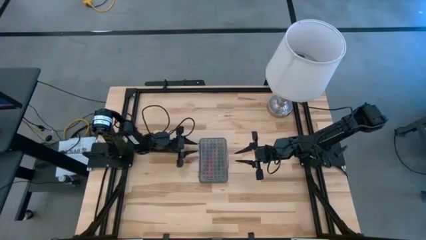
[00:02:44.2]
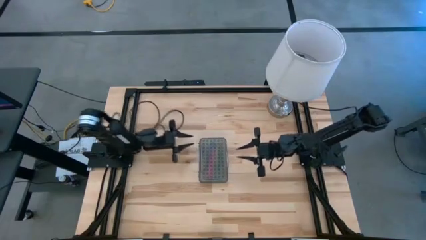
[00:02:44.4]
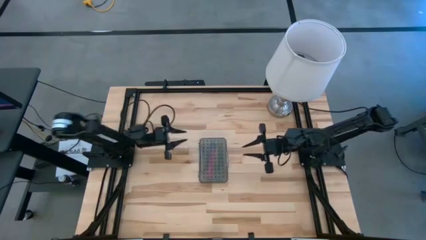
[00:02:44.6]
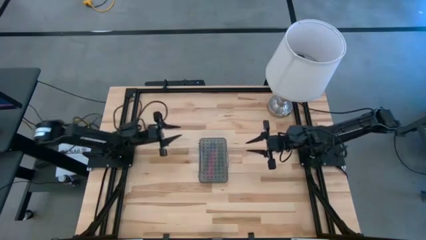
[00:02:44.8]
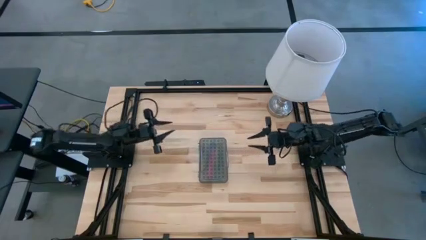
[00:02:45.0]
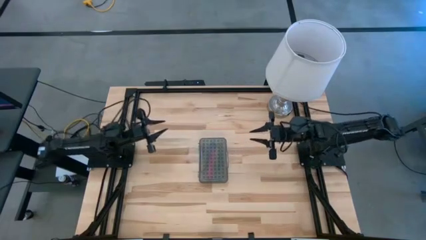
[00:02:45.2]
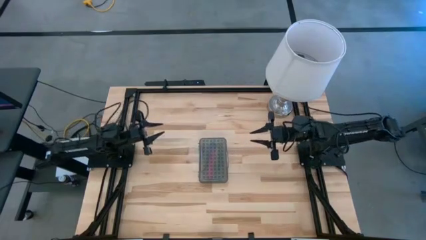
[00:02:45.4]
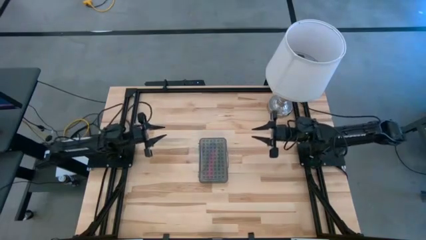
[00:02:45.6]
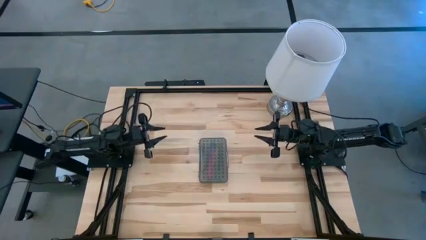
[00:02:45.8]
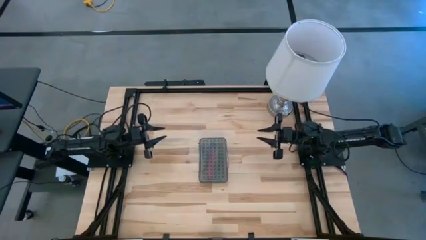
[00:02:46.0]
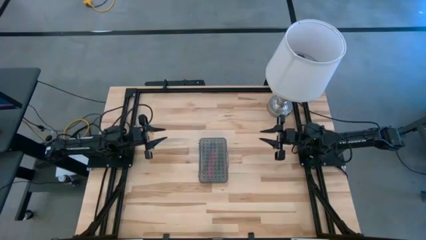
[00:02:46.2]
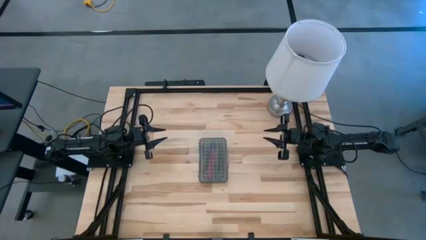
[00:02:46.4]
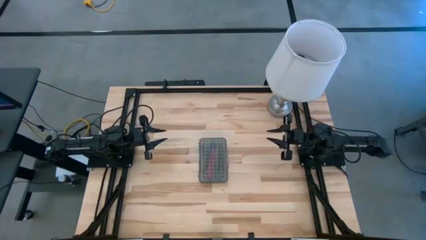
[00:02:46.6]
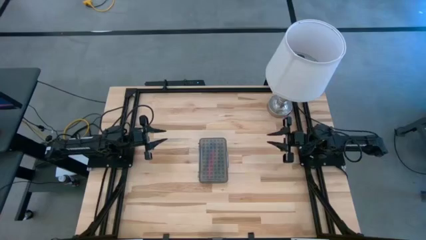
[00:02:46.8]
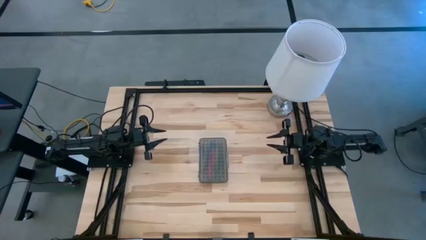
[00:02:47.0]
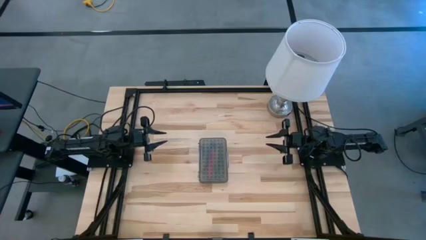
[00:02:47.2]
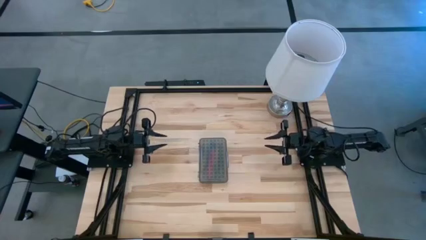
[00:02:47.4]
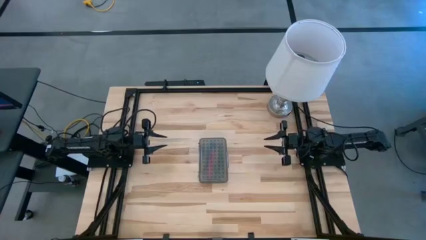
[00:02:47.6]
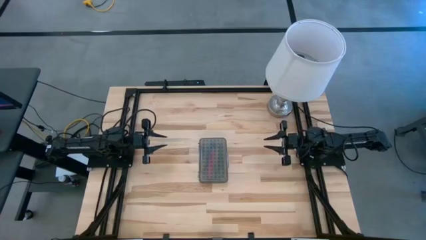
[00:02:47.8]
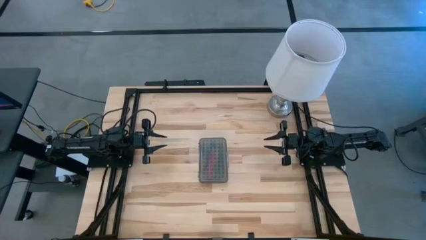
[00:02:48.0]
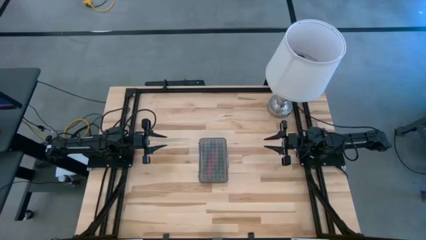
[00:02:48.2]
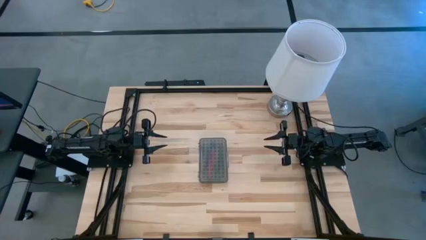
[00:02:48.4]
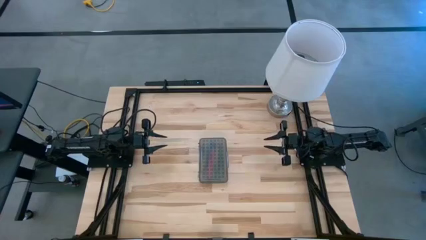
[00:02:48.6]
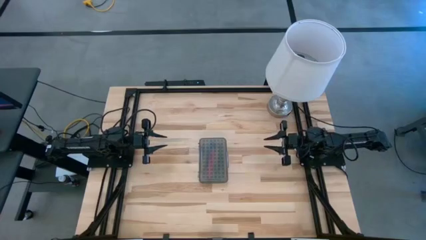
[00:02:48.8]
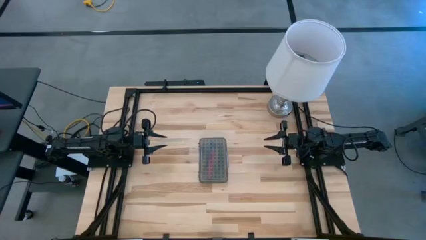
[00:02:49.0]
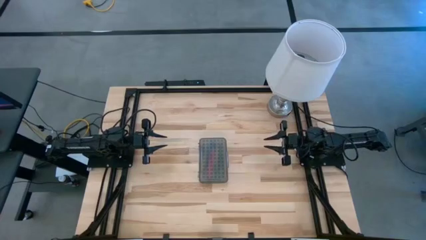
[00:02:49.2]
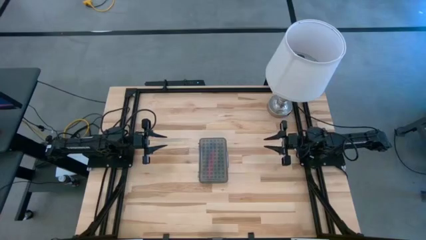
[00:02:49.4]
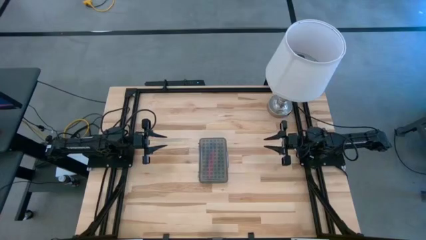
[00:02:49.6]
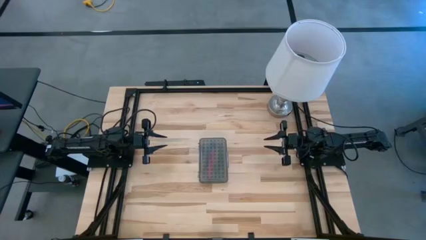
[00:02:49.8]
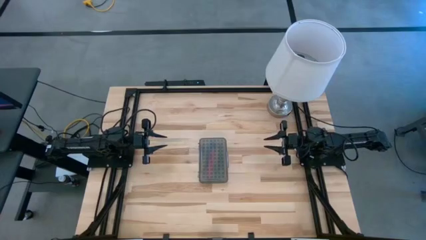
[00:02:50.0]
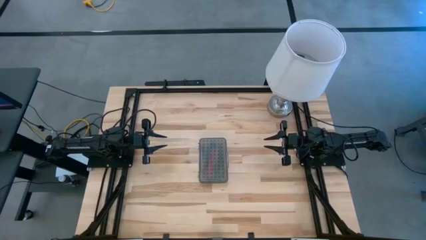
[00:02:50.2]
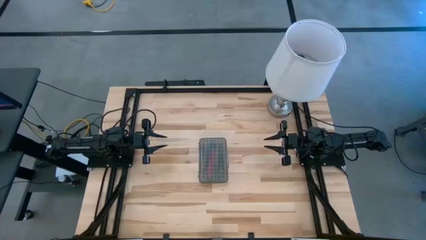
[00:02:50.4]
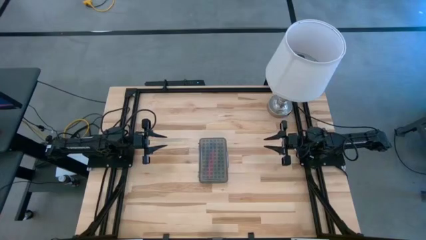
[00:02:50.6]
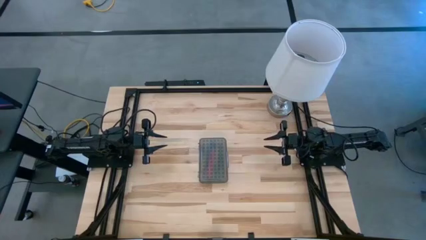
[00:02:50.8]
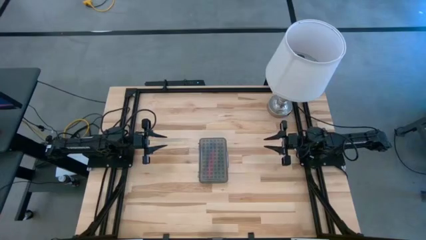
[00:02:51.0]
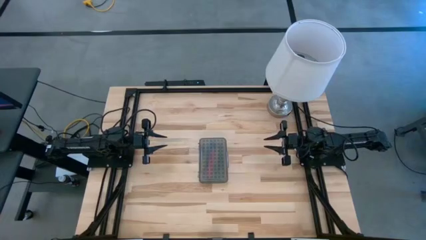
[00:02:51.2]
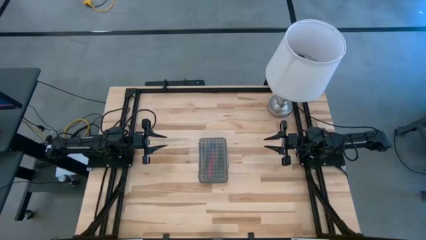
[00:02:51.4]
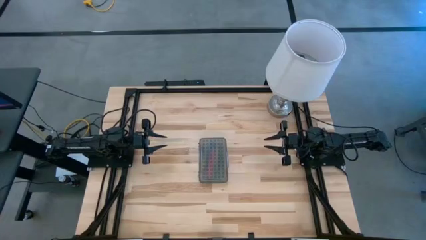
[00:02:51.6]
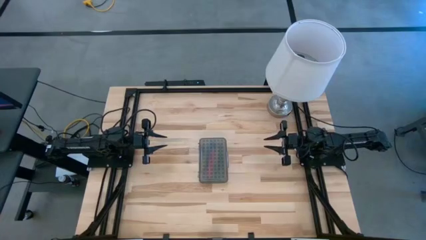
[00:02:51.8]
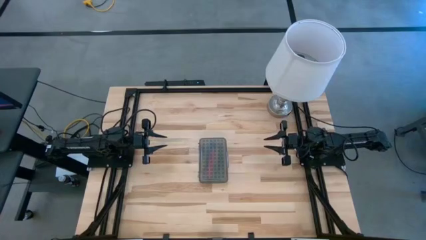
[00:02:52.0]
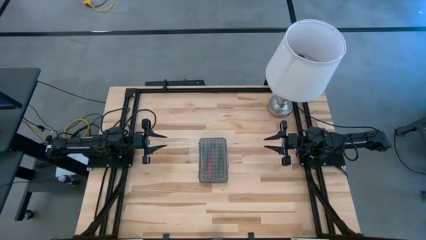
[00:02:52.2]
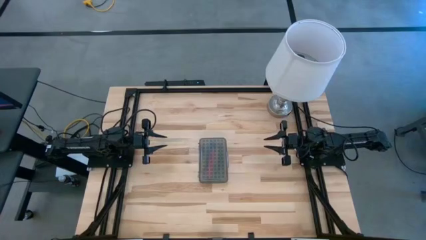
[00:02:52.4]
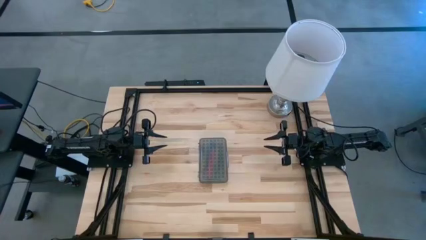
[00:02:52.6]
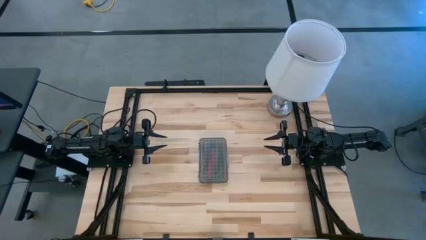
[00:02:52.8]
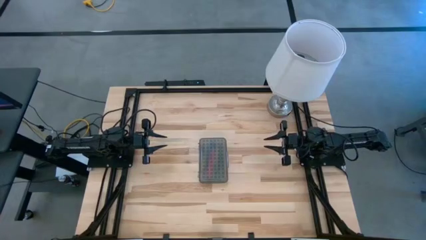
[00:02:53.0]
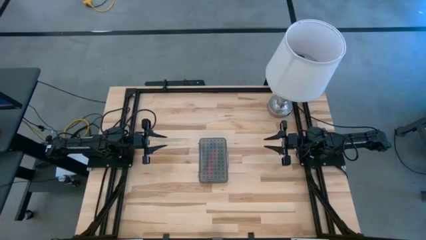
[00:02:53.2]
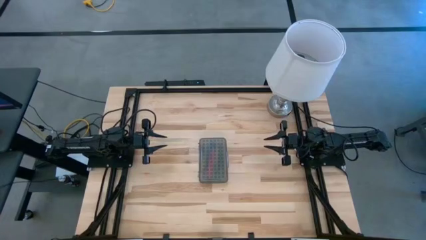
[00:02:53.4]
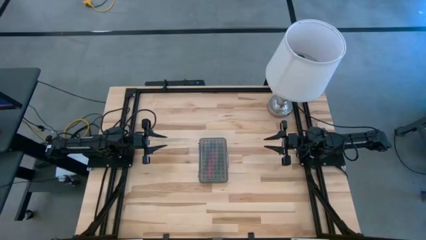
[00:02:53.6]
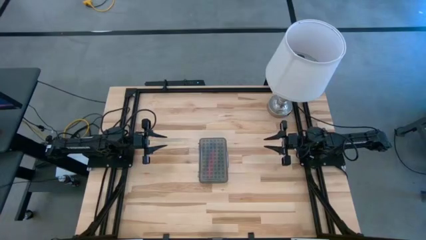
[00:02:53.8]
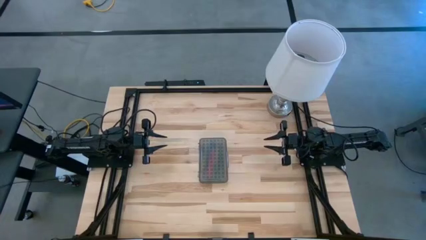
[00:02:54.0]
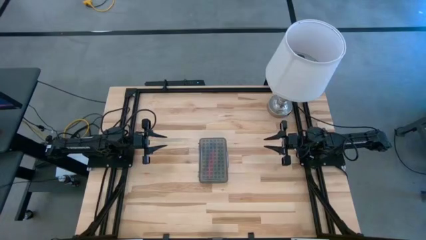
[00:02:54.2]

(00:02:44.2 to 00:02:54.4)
Task: Pick & place school supplies into a supply box
Return to Home Position
